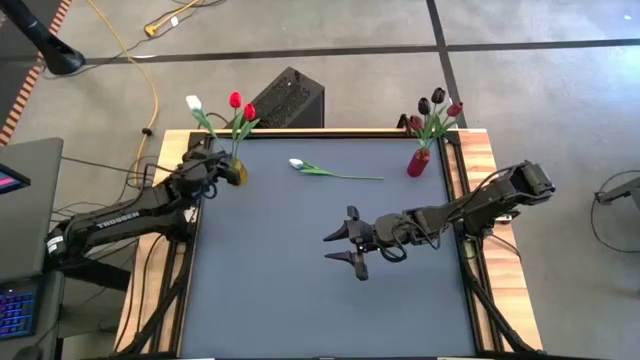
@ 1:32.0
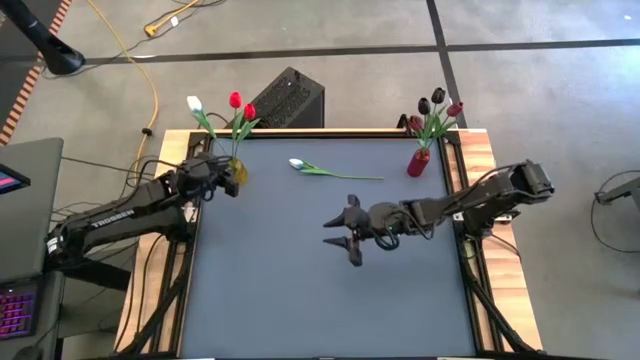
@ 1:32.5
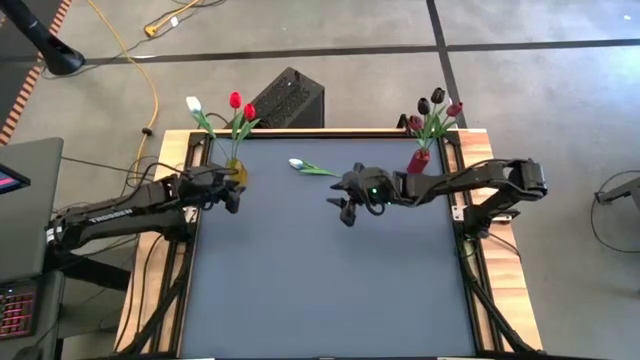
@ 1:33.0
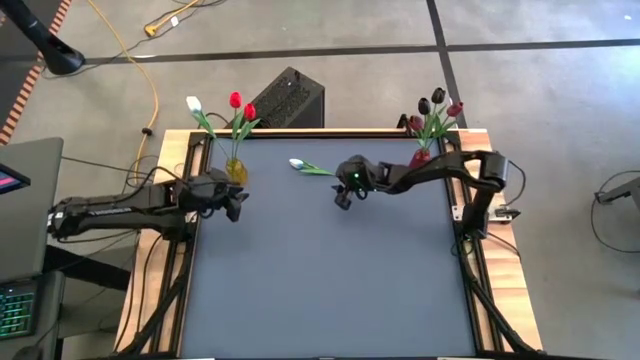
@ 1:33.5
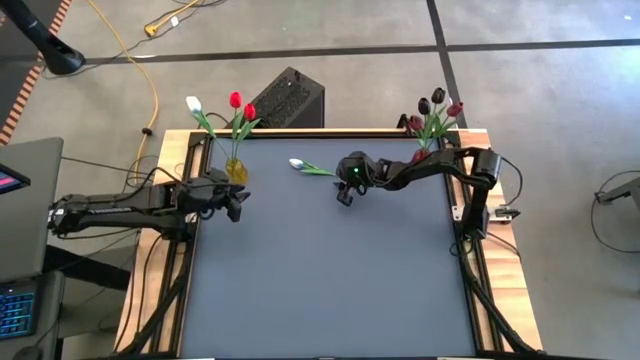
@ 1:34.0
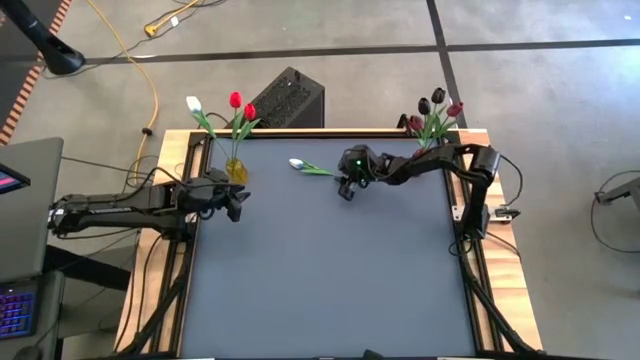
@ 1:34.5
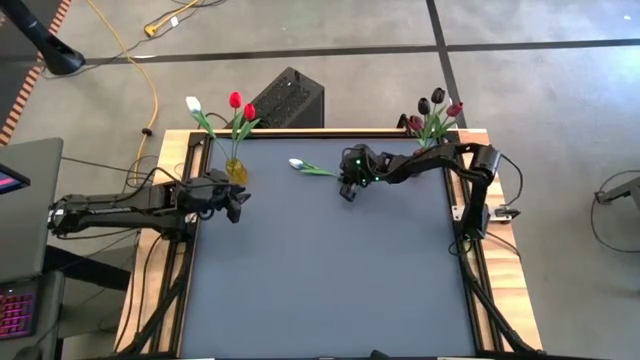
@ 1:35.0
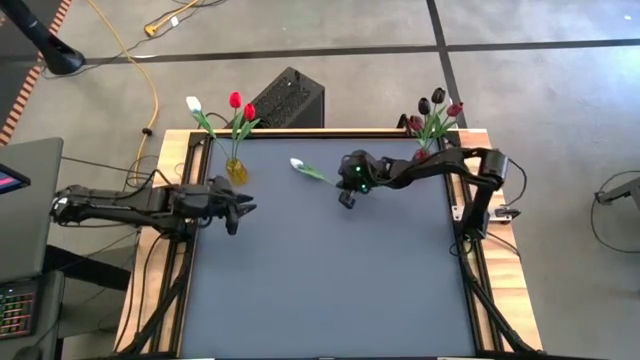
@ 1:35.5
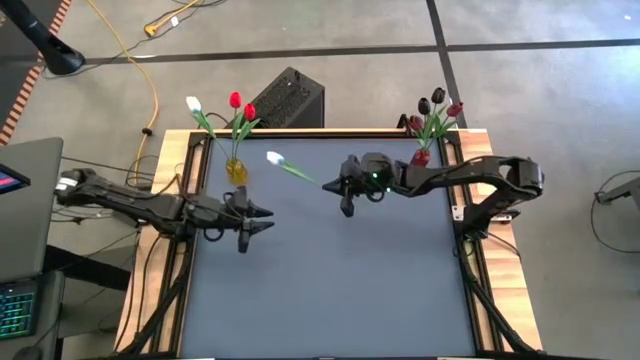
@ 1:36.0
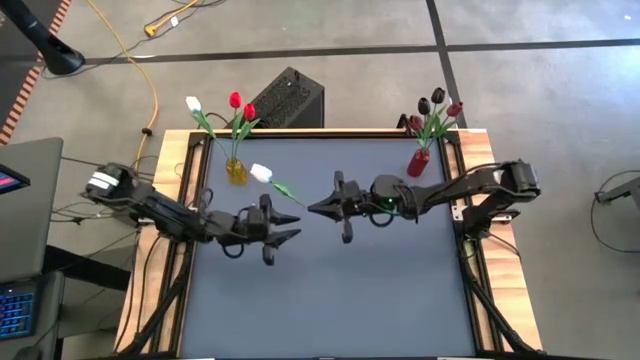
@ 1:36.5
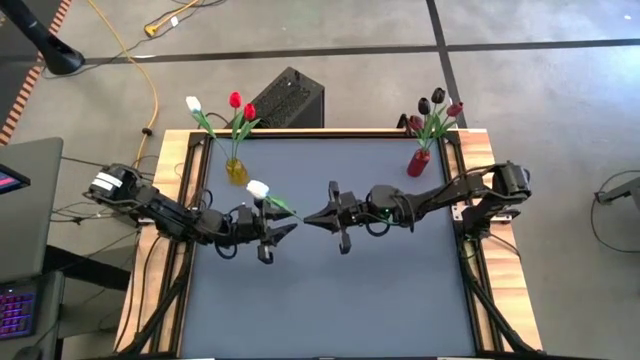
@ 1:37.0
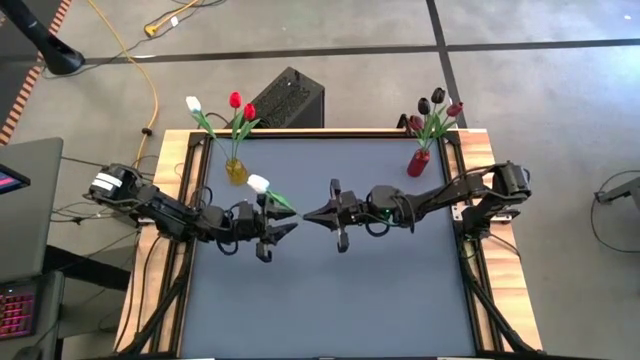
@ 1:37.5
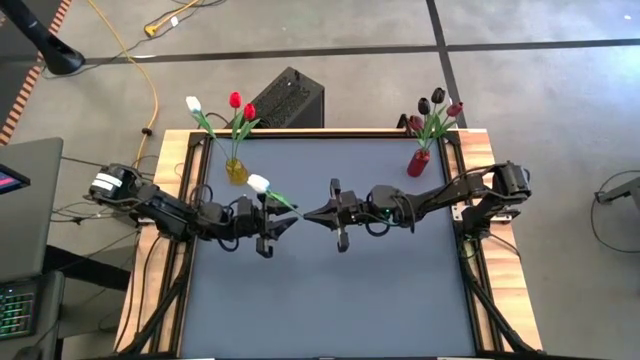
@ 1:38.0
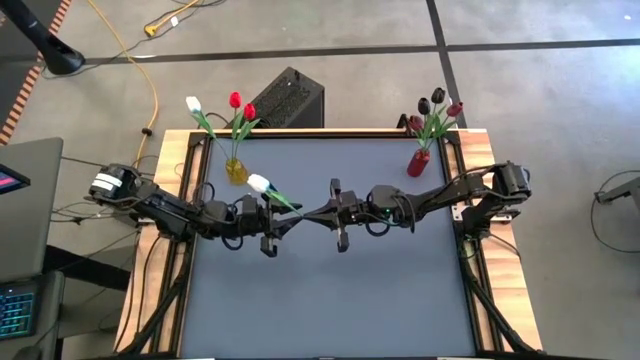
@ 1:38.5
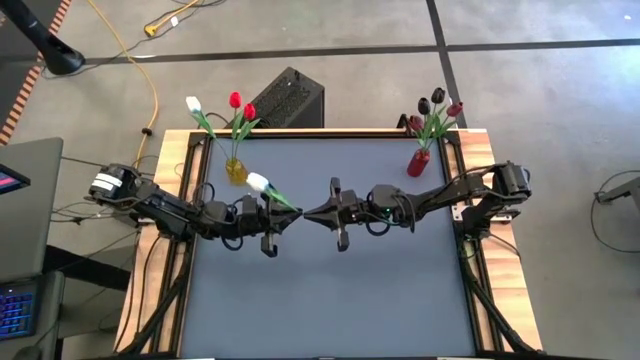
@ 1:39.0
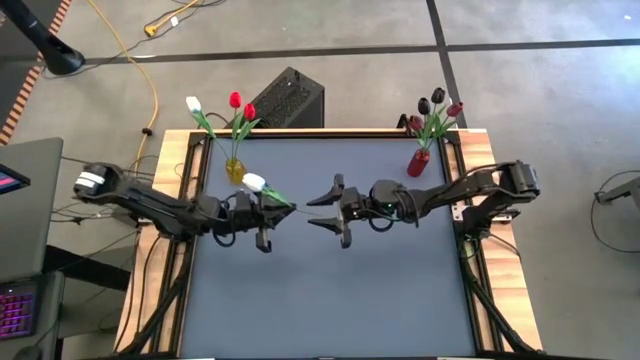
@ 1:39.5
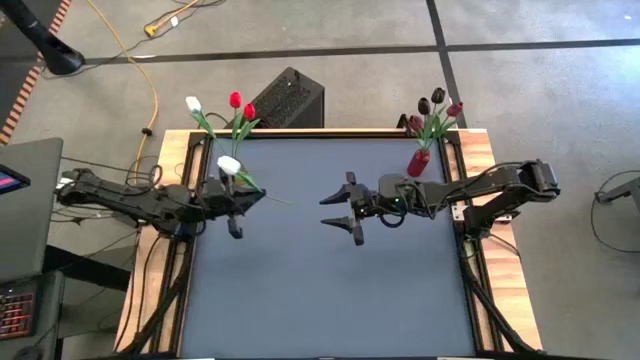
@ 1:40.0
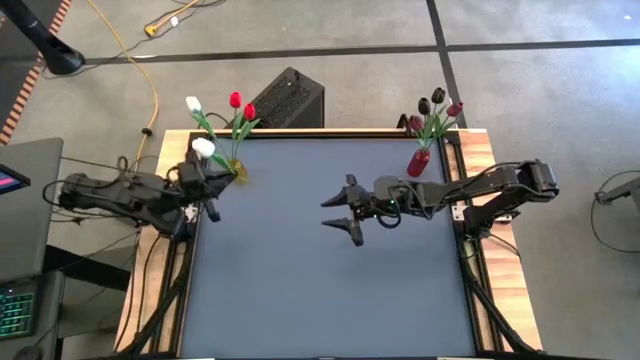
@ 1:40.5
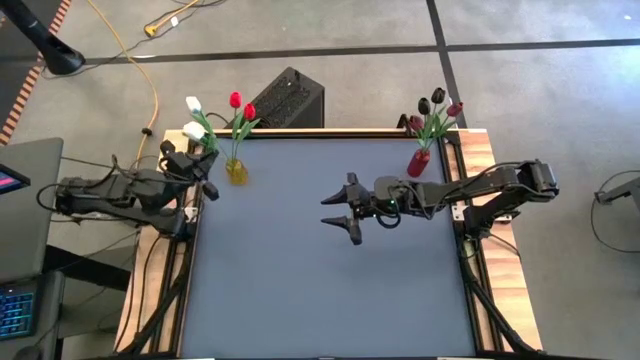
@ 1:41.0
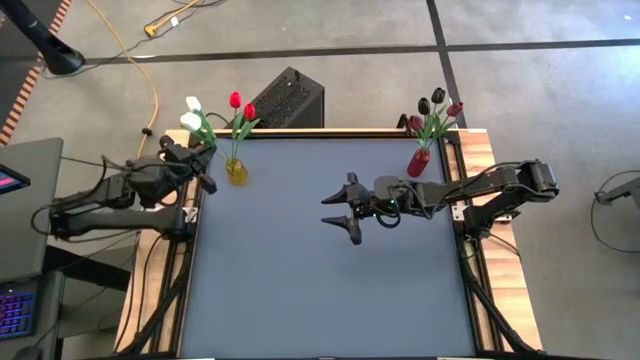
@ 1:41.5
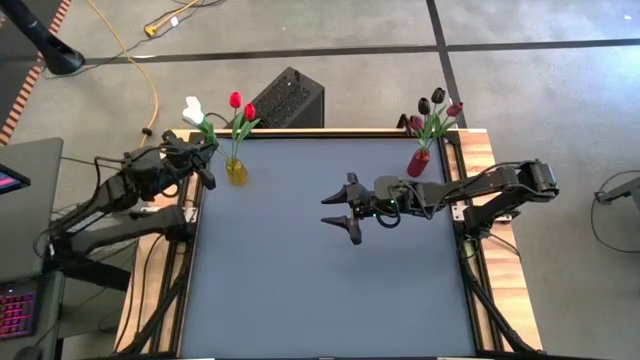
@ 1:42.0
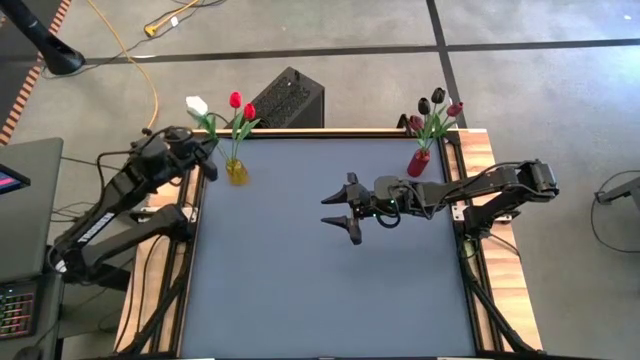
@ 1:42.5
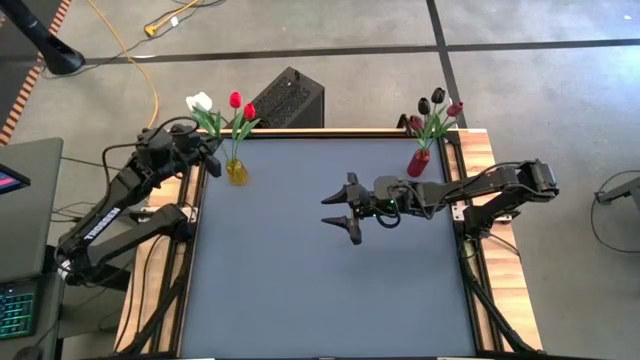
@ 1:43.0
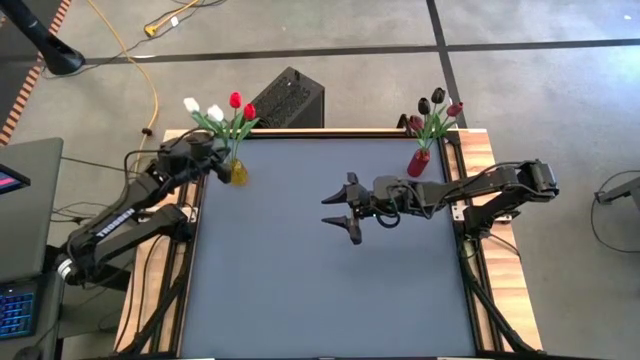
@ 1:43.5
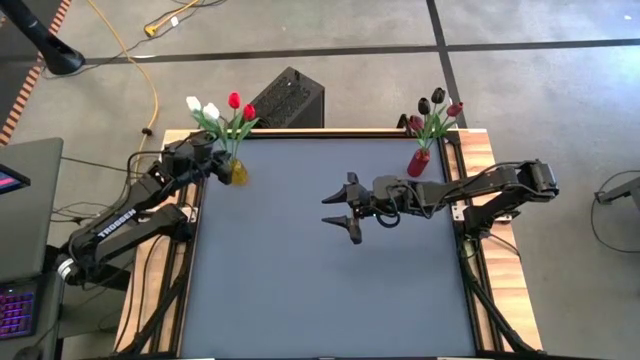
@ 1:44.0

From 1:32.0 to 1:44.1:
Task: Sort flowers into vase by color
Put the white tulip into the yellow flower vase

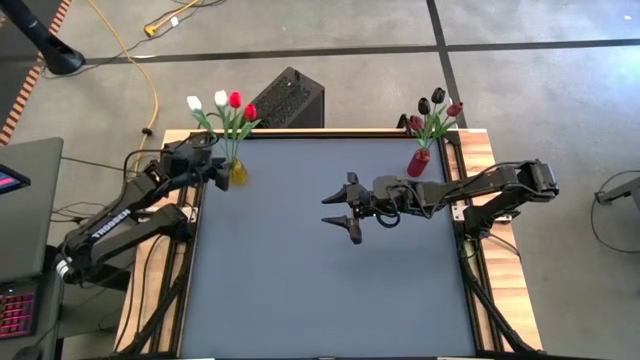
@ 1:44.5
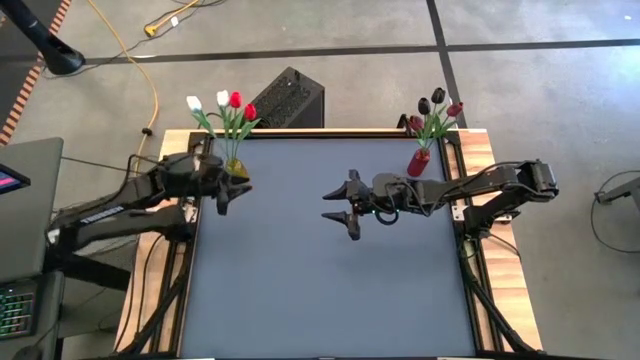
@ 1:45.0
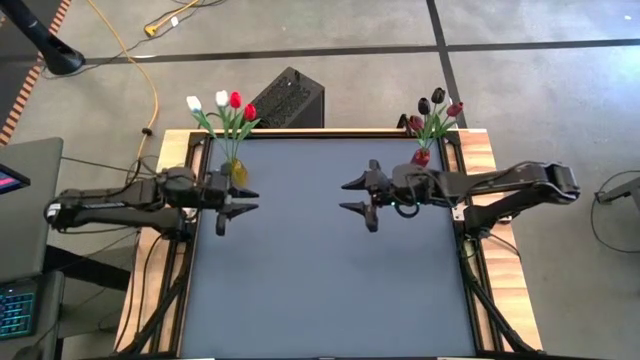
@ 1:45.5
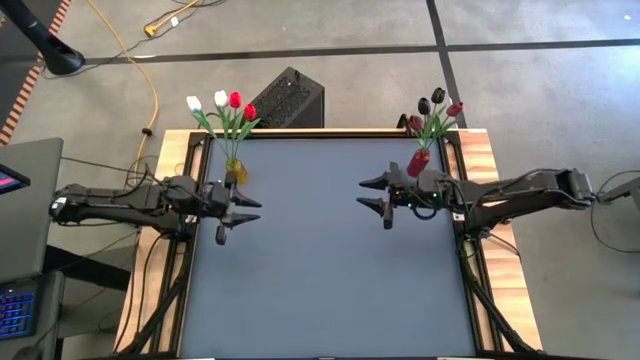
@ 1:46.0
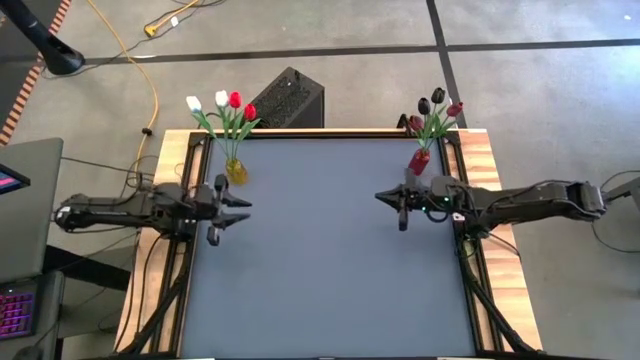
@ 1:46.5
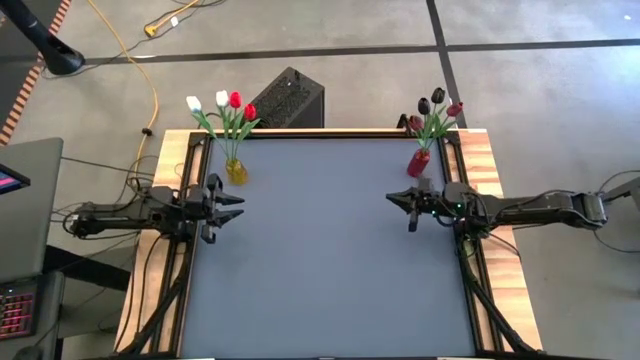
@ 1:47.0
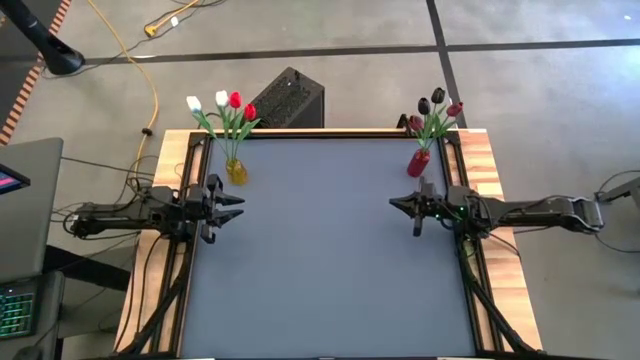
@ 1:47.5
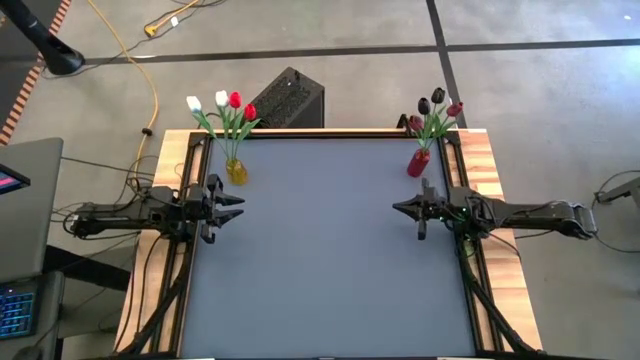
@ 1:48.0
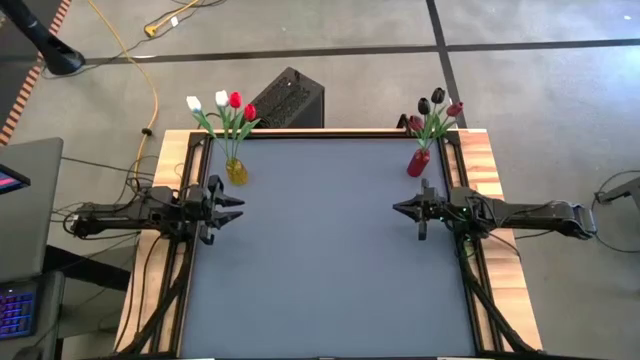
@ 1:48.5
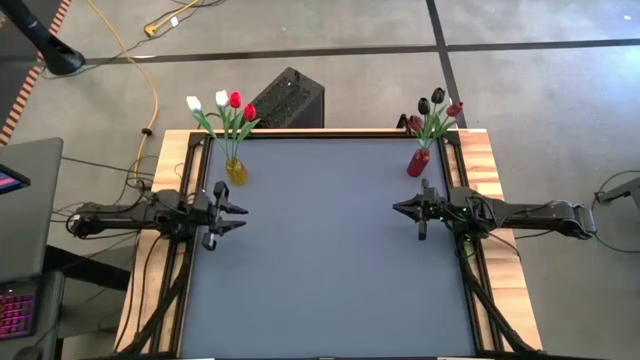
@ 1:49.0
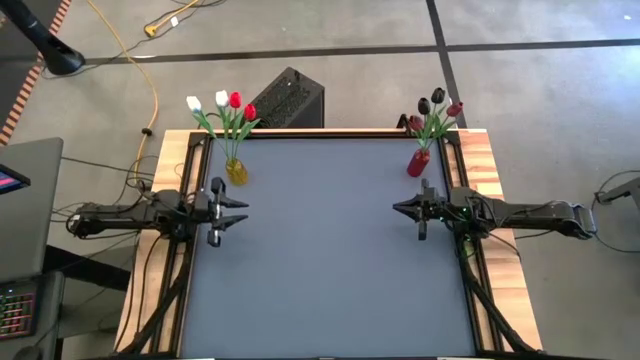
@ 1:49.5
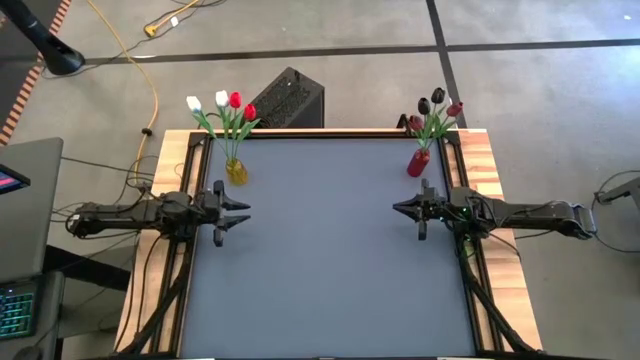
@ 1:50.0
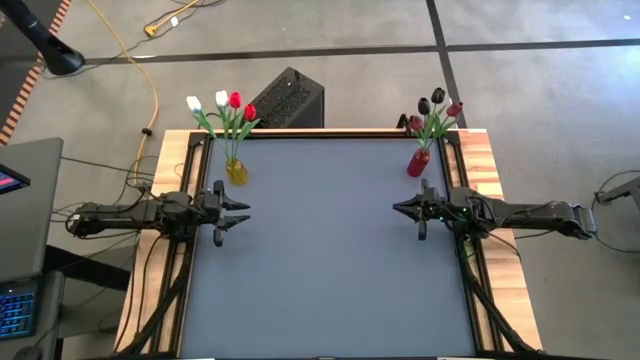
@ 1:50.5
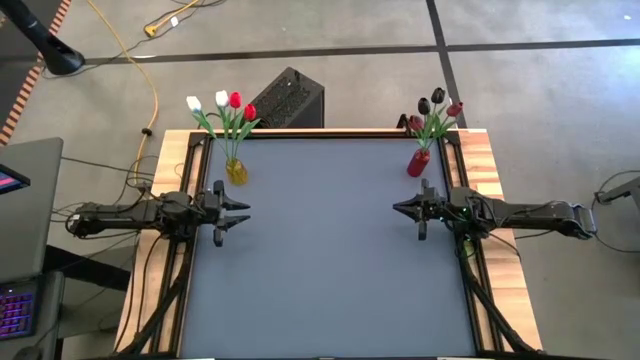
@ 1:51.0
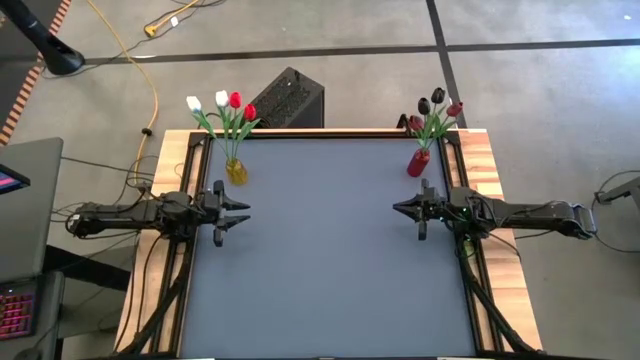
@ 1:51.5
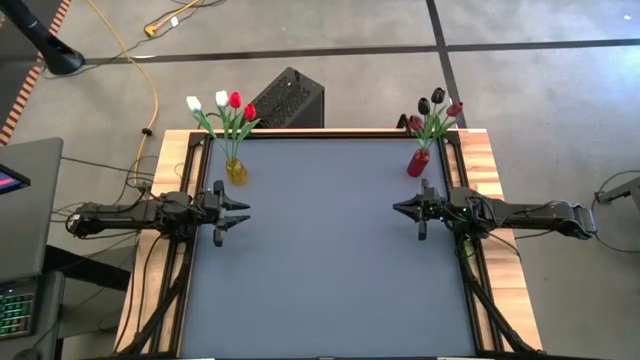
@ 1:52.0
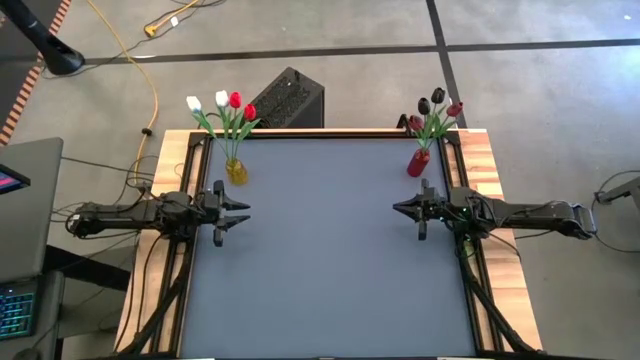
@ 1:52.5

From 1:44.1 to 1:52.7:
Return to Home Position
